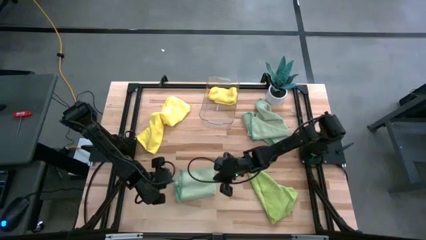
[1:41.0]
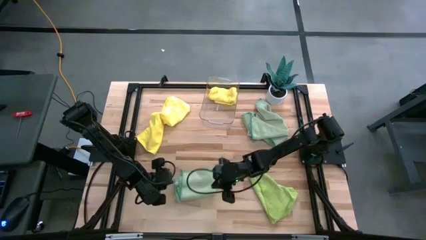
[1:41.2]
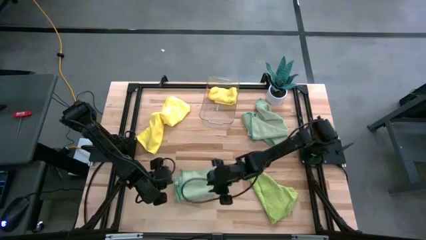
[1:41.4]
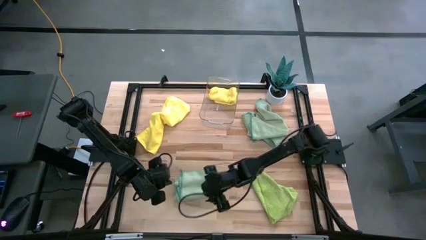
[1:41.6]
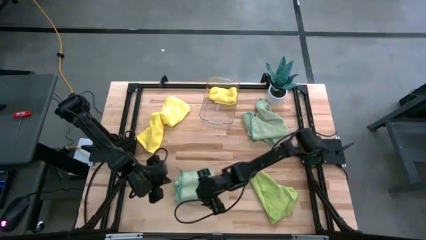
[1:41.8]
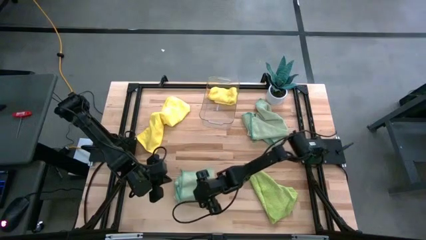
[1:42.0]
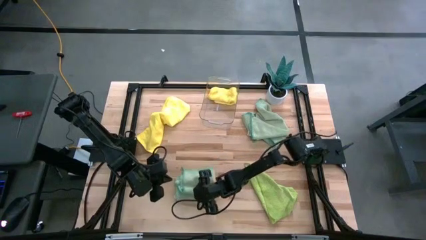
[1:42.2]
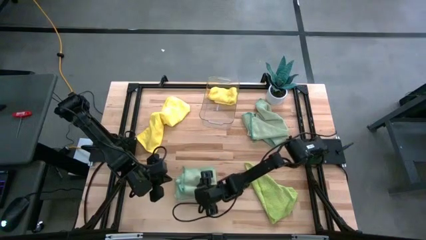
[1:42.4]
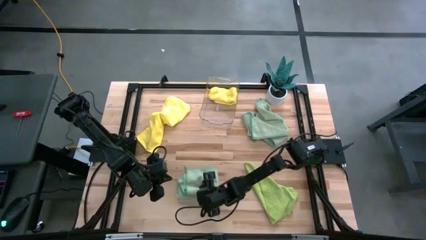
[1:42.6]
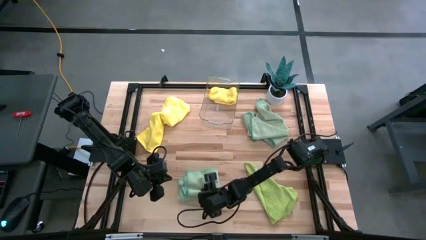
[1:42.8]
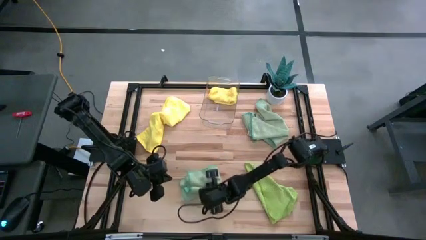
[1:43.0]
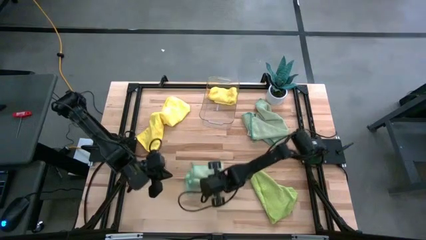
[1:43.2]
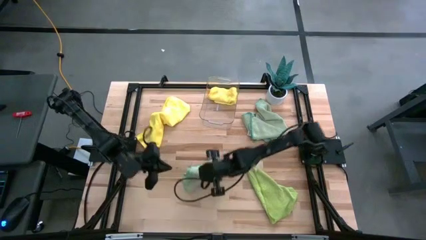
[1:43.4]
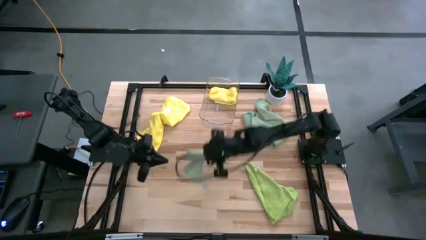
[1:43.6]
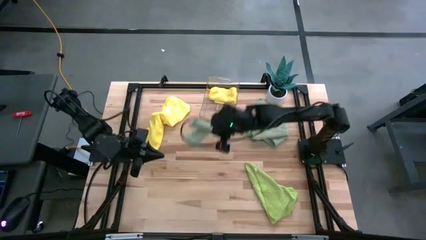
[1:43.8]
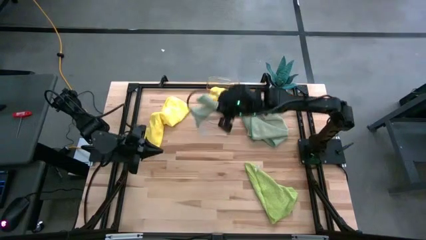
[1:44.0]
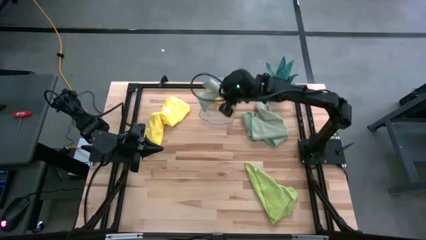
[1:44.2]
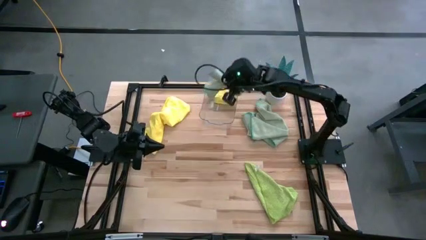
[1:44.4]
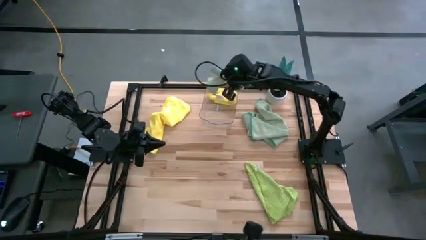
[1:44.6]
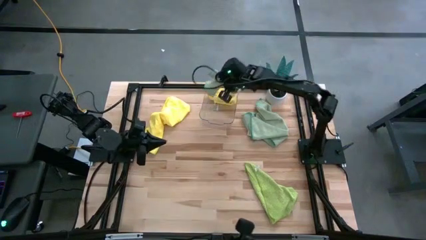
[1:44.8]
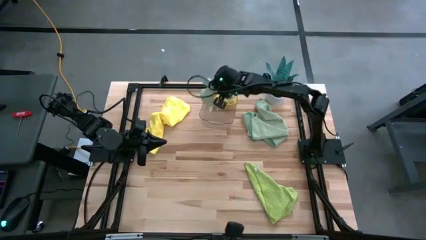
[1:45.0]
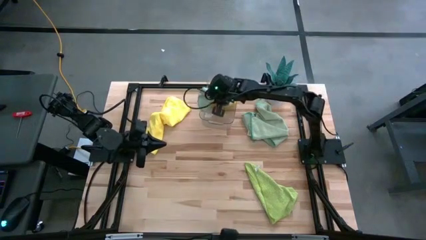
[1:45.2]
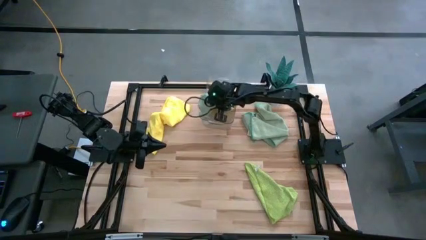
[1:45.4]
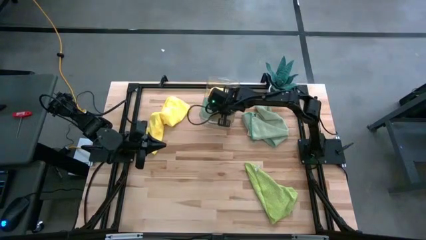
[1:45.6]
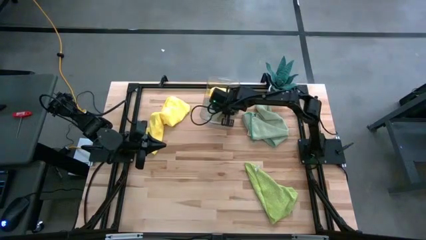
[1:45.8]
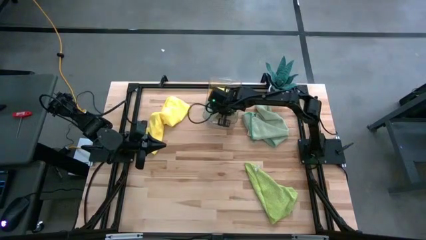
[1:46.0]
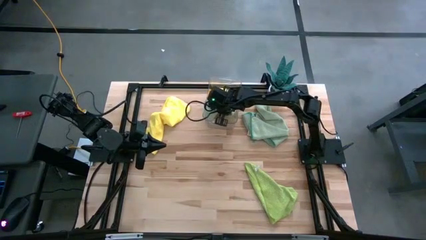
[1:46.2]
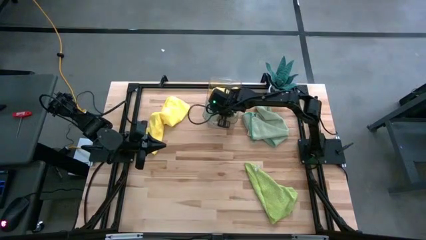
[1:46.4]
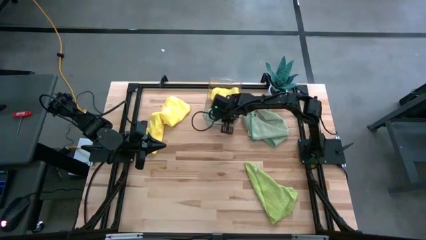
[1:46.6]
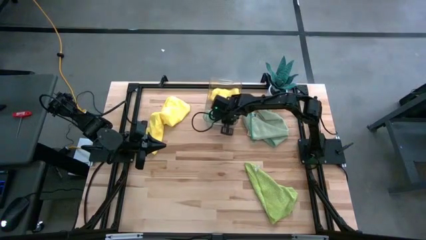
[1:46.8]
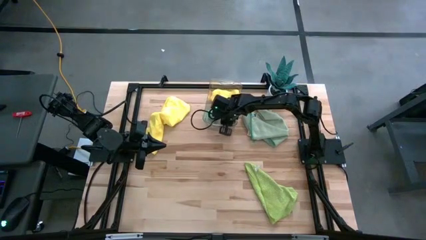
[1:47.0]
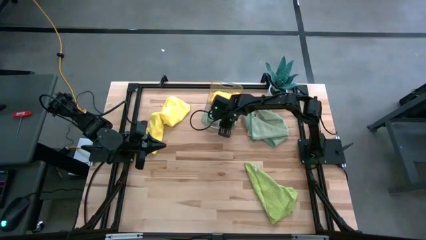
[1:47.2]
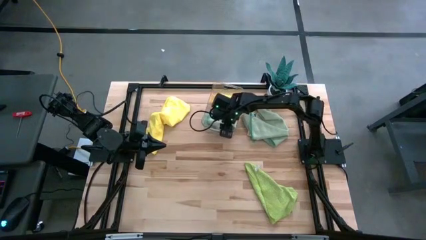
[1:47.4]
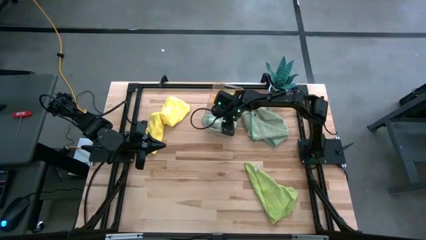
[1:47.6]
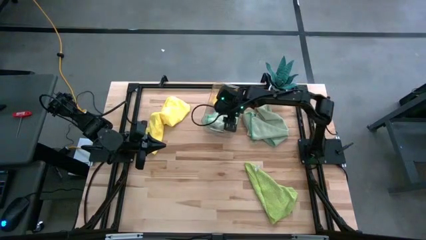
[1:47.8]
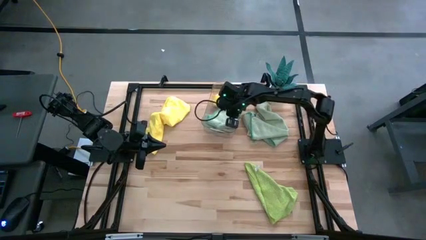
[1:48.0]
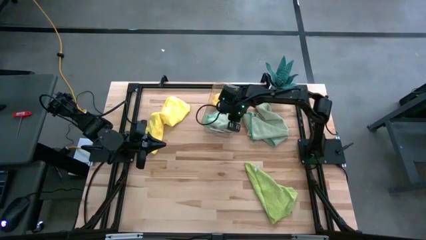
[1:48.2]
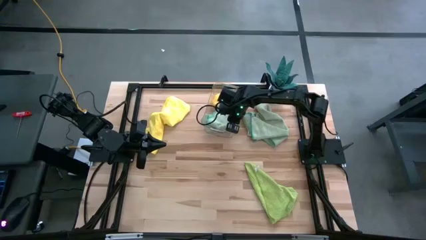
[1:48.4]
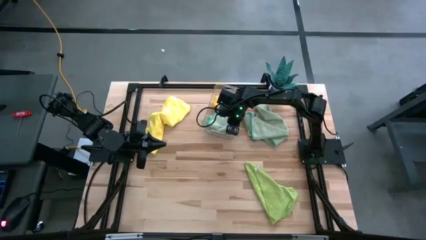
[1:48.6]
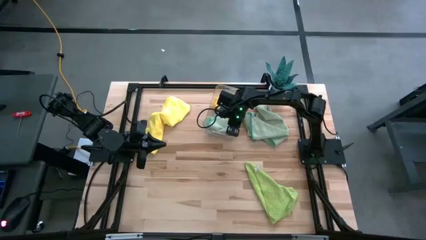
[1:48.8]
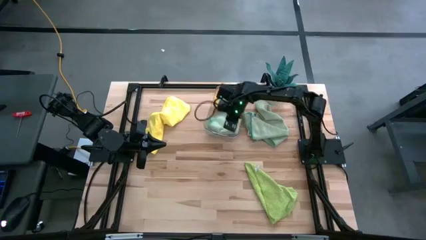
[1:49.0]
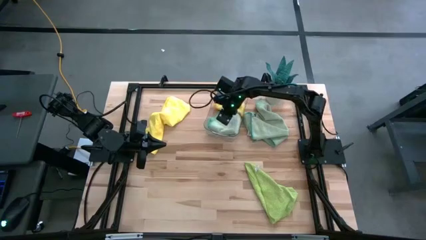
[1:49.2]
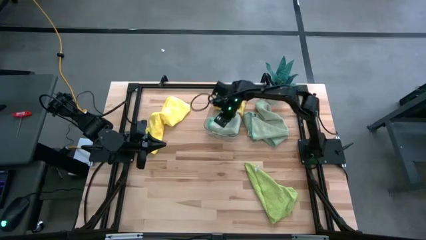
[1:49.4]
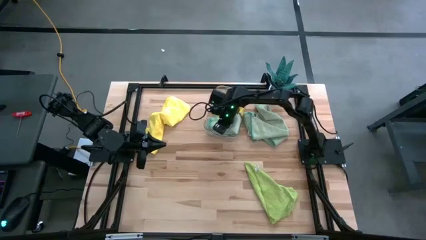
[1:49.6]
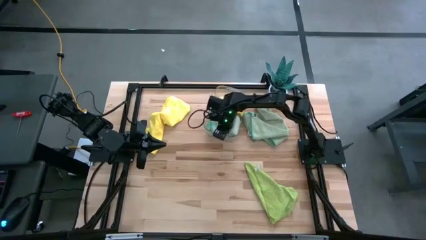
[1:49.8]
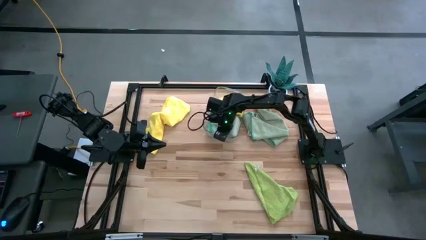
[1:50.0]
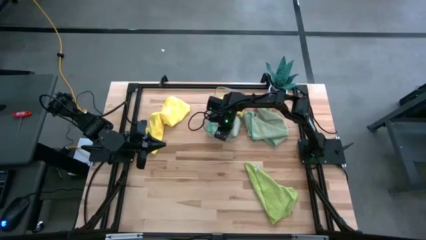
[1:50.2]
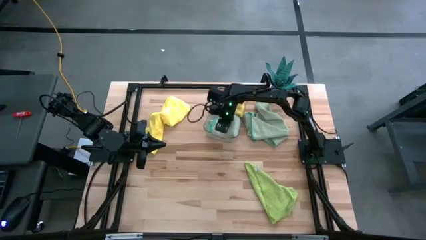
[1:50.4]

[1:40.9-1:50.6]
Task: Fold microfiber towels
Put the folded blue towel into the transparent bin

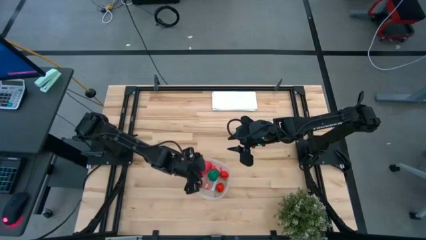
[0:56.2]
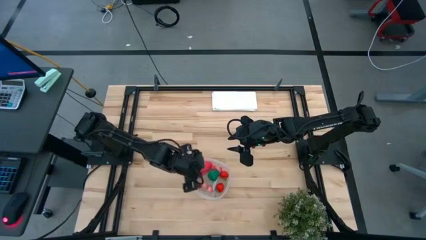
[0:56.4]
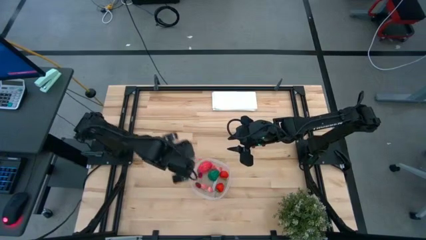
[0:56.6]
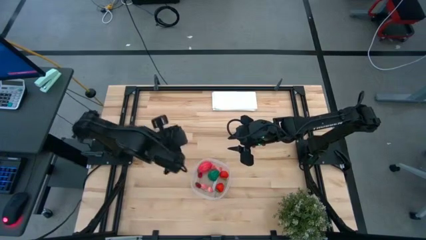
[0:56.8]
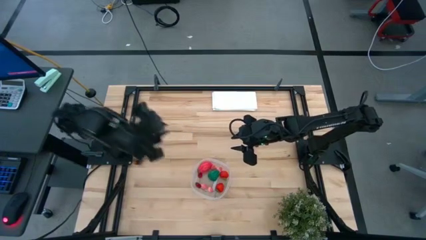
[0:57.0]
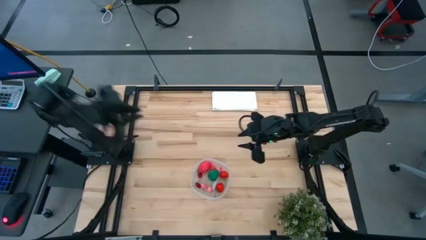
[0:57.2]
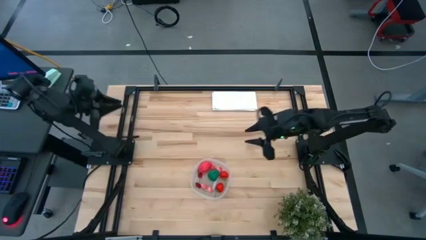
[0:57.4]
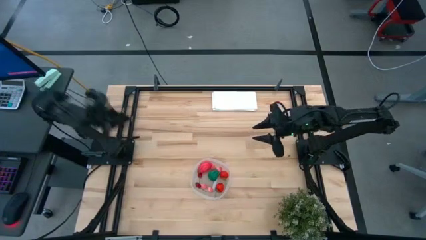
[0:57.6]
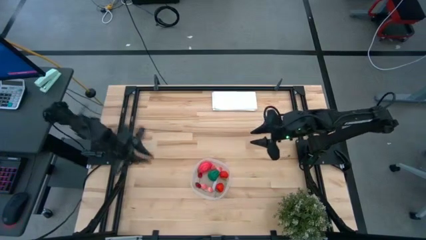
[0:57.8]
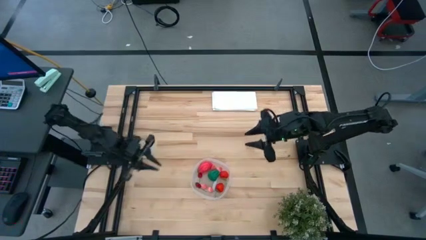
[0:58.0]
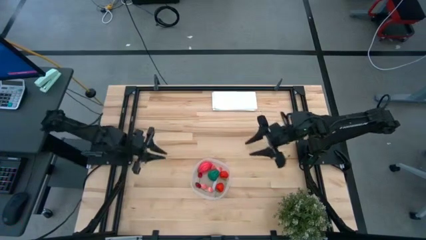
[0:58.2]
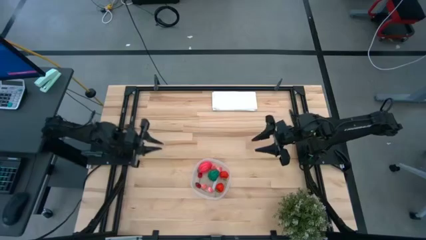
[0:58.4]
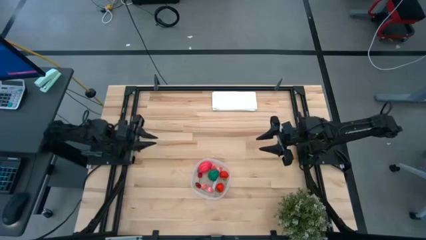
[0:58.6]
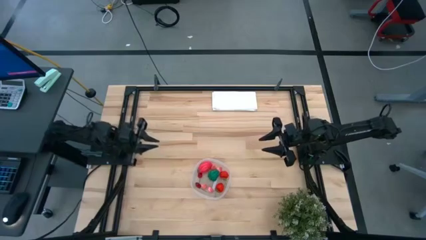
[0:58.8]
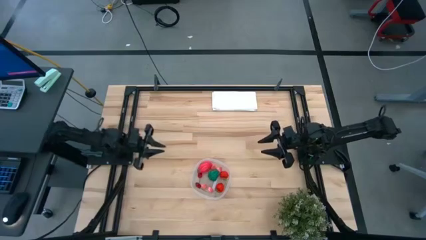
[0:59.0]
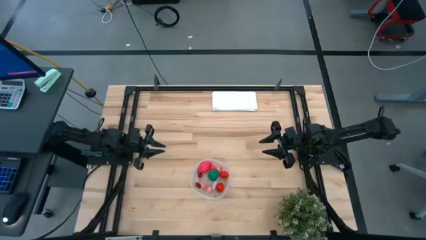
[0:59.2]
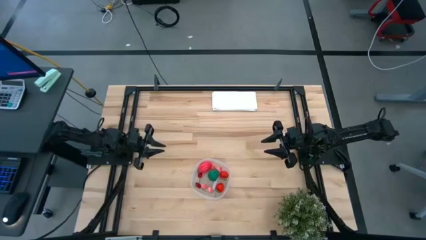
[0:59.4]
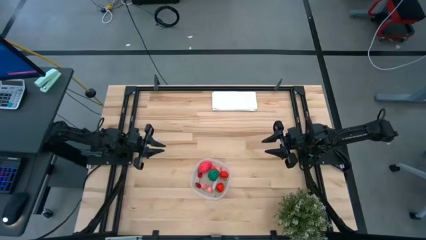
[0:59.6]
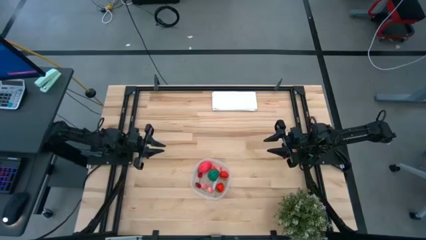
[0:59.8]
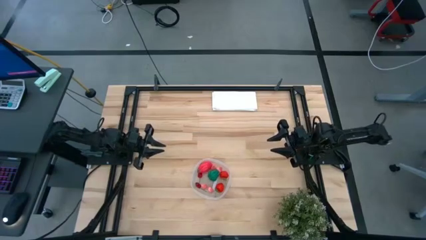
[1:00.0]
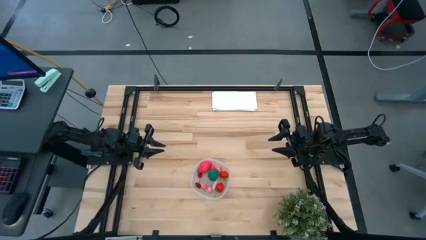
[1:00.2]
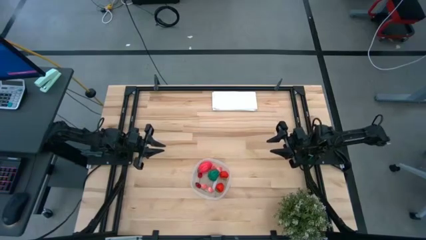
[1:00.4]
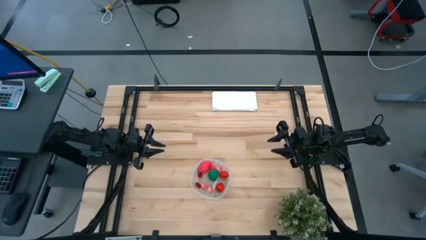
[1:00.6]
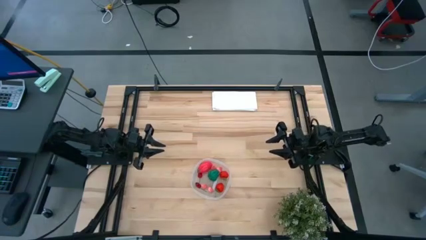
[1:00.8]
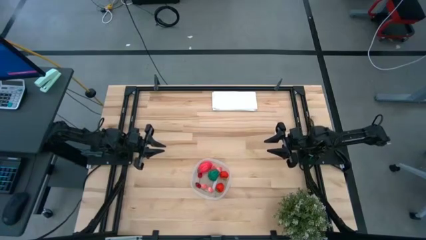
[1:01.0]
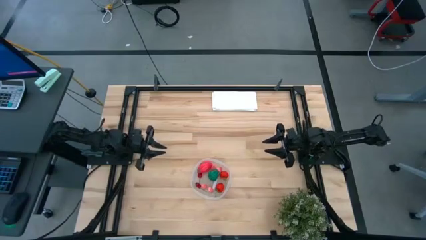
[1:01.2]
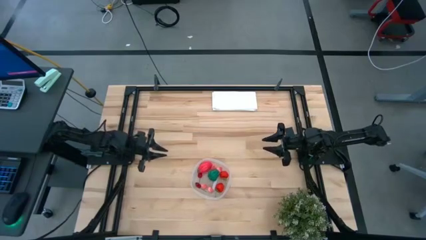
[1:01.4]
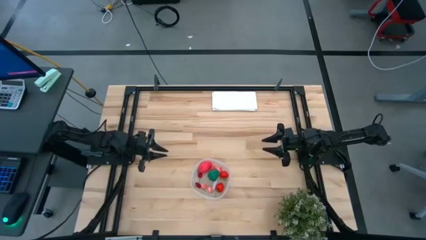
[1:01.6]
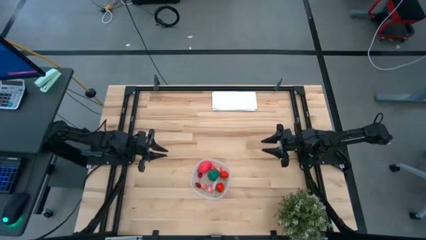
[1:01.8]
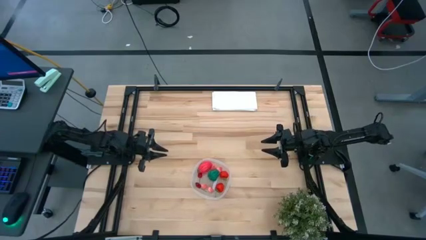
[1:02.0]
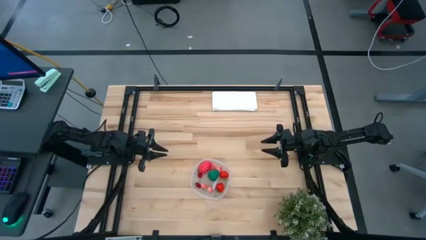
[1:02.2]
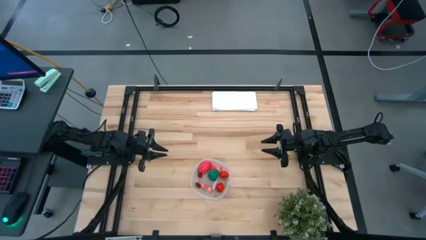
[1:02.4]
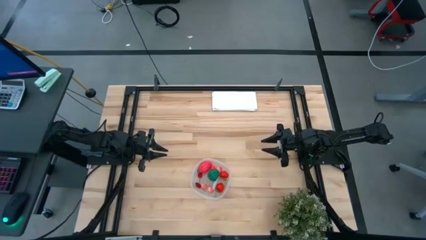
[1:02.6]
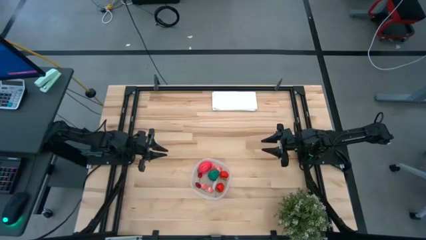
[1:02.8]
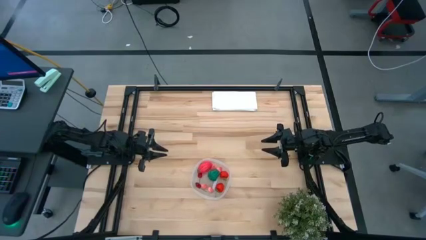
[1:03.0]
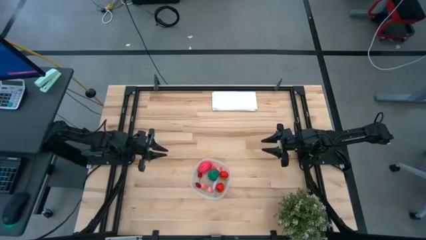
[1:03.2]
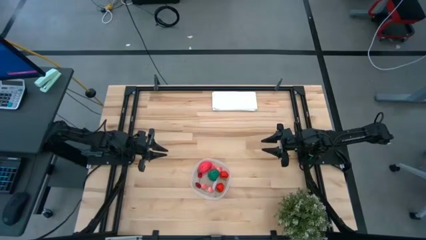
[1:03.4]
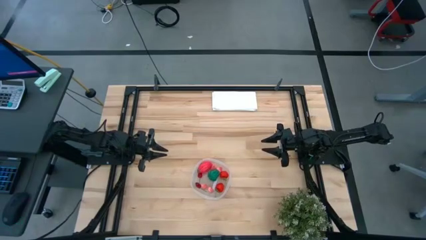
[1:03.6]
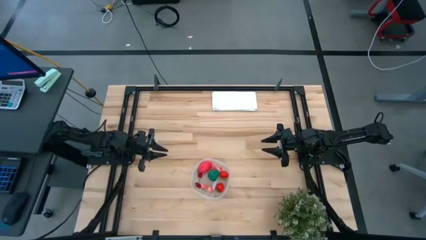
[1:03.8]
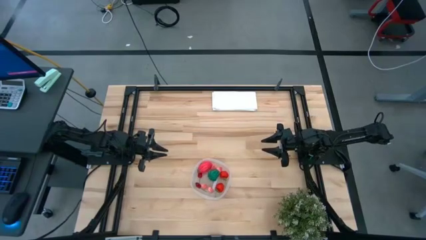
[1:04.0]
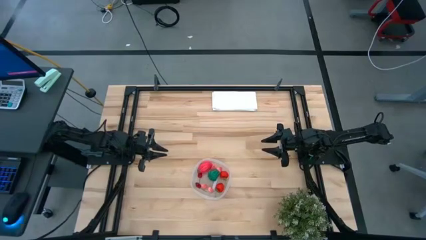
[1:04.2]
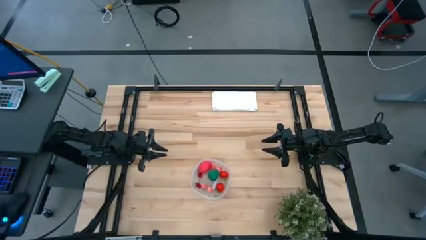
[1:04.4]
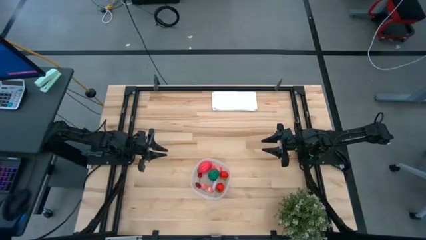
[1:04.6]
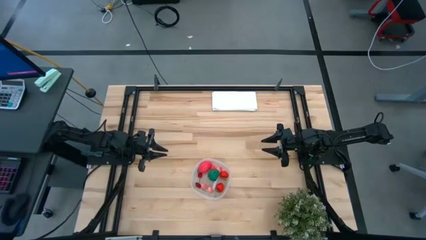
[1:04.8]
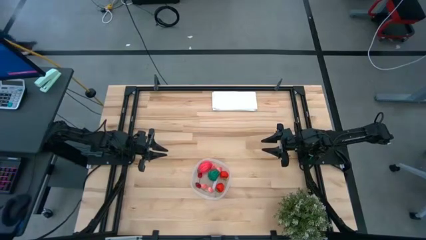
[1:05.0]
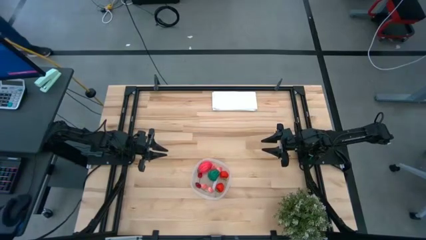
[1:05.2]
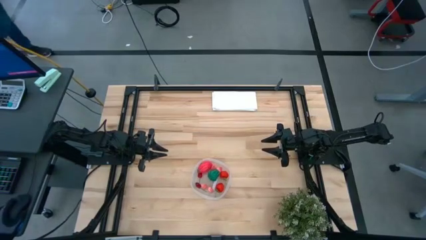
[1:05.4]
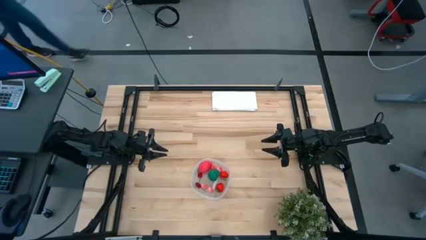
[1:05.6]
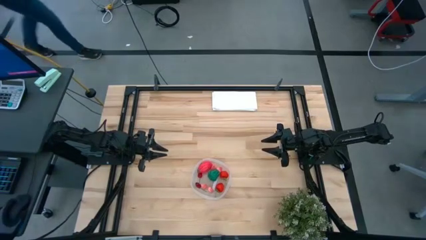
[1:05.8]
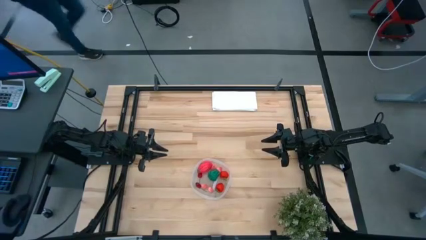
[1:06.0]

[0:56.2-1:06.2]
Task: Pick and placing Produce into tupperware
Return to Home Position
